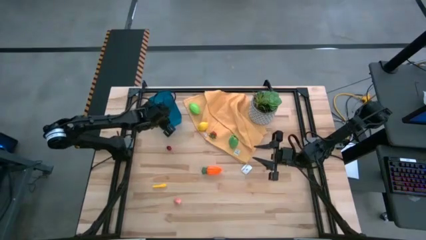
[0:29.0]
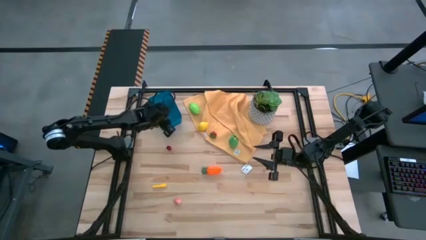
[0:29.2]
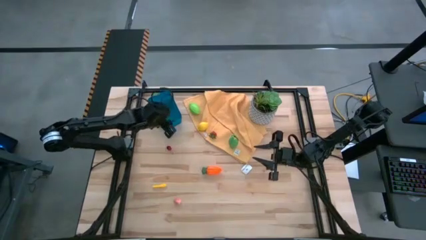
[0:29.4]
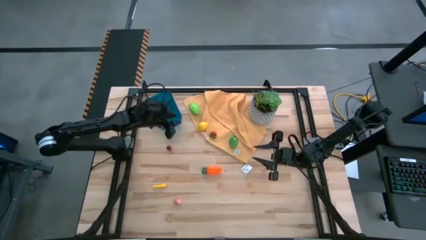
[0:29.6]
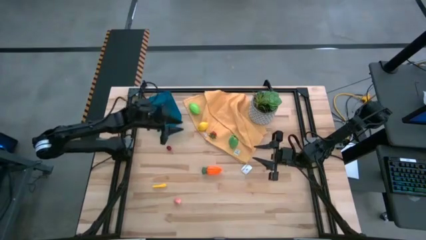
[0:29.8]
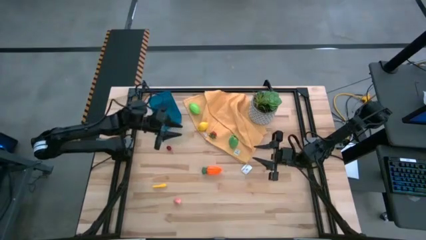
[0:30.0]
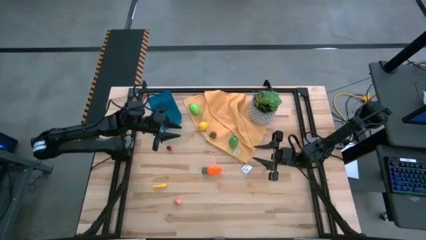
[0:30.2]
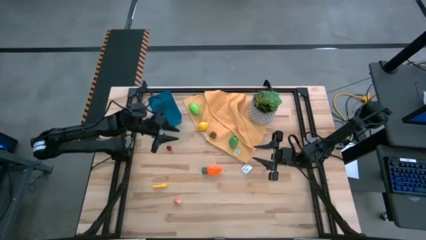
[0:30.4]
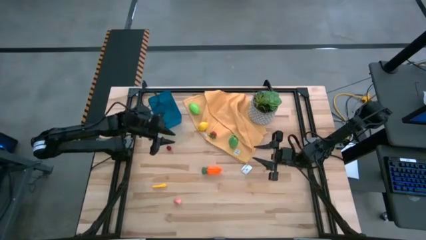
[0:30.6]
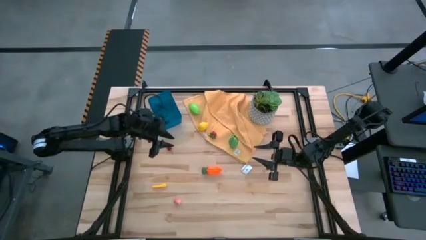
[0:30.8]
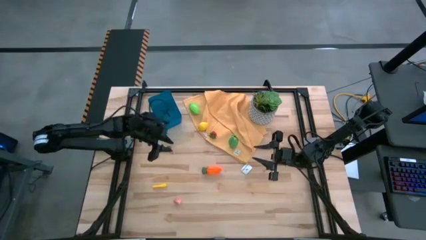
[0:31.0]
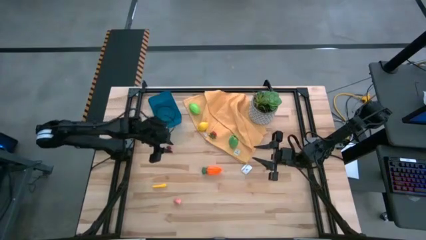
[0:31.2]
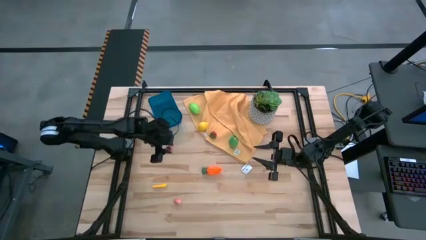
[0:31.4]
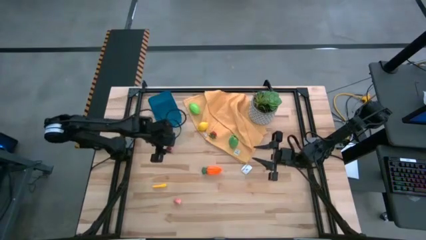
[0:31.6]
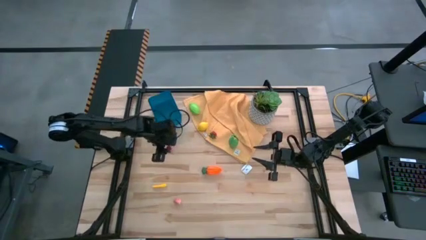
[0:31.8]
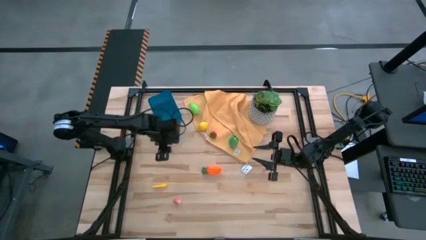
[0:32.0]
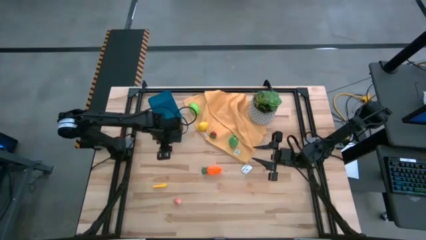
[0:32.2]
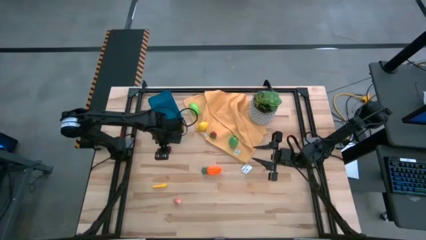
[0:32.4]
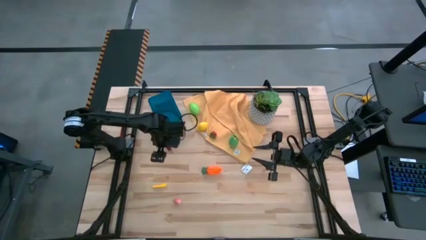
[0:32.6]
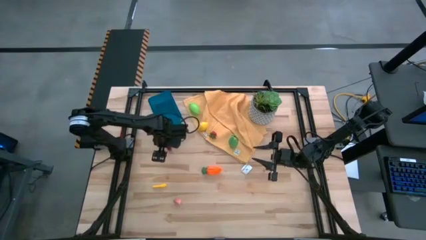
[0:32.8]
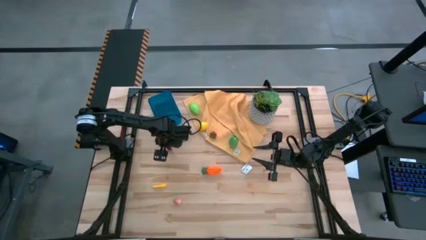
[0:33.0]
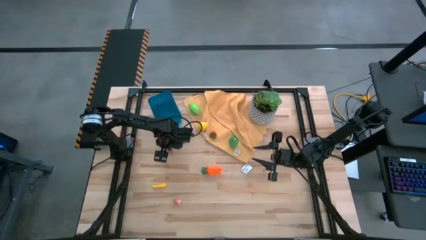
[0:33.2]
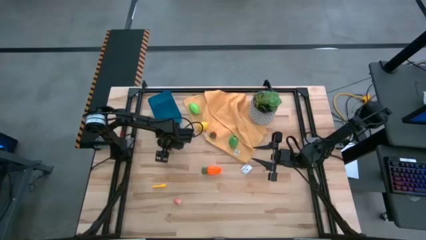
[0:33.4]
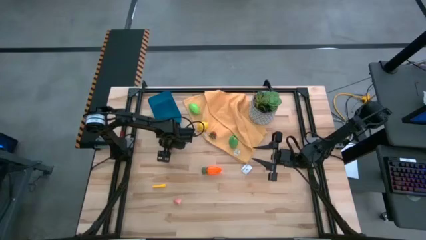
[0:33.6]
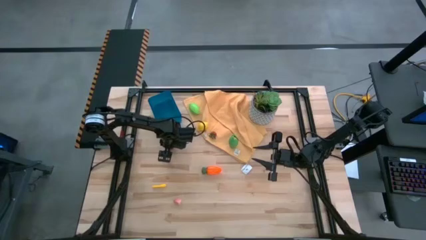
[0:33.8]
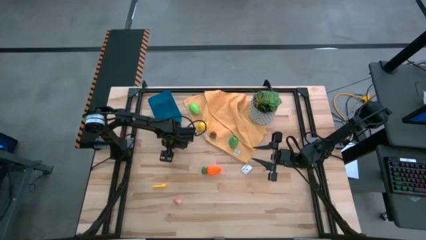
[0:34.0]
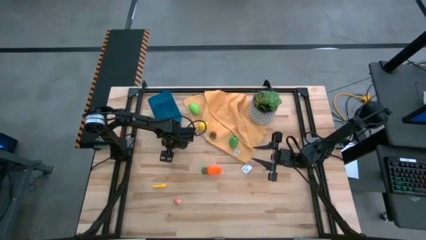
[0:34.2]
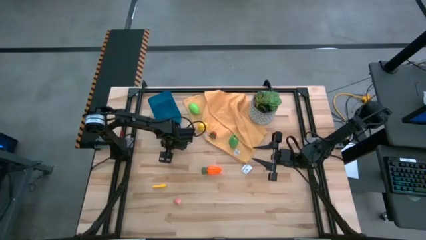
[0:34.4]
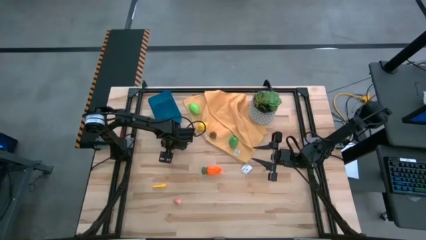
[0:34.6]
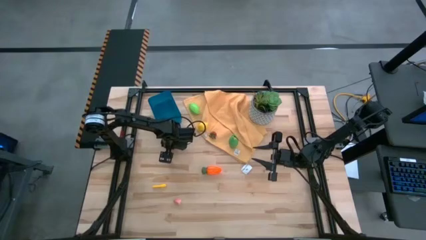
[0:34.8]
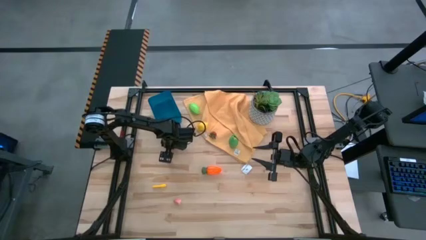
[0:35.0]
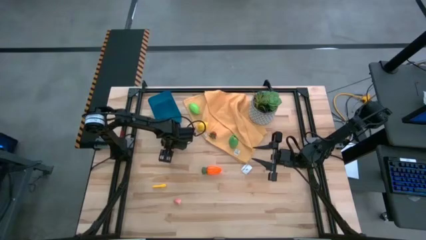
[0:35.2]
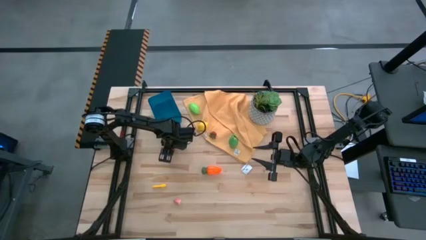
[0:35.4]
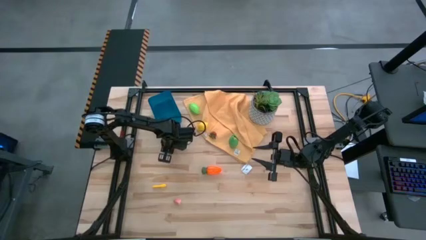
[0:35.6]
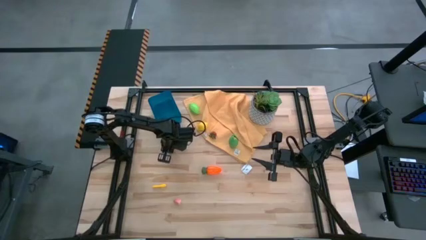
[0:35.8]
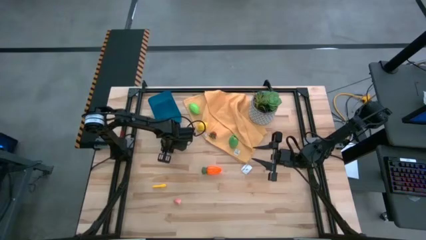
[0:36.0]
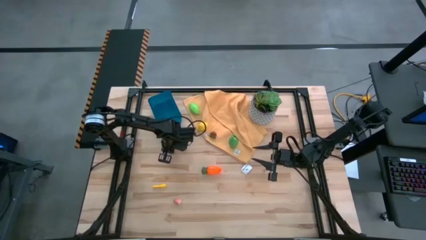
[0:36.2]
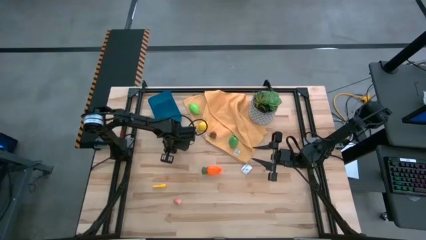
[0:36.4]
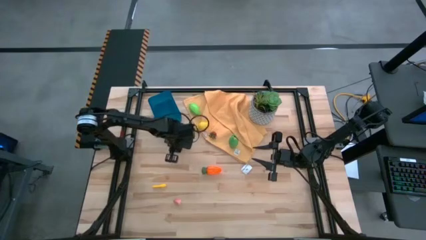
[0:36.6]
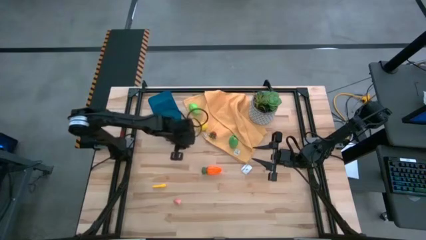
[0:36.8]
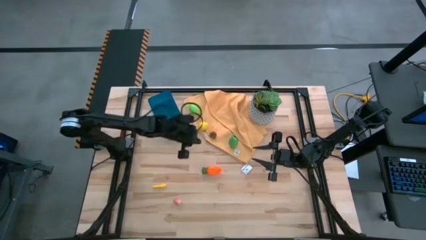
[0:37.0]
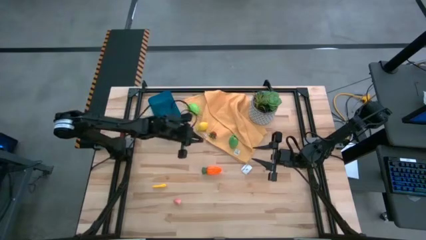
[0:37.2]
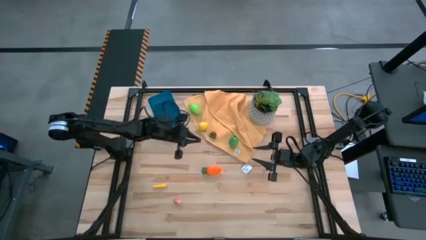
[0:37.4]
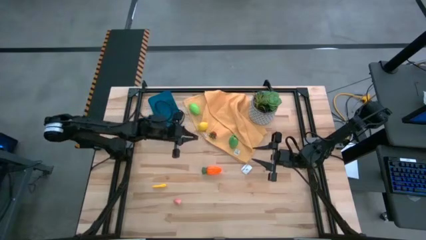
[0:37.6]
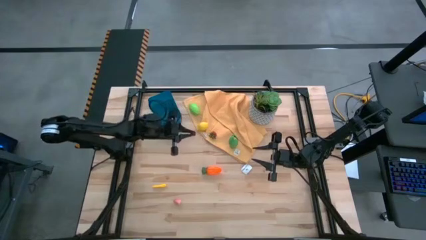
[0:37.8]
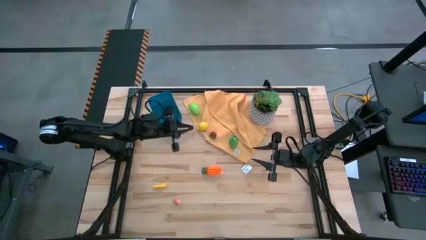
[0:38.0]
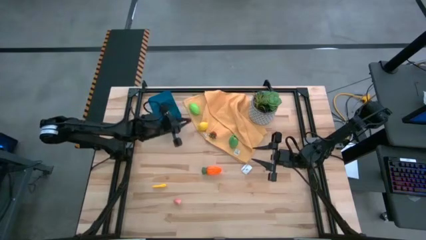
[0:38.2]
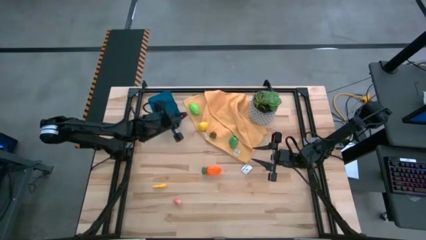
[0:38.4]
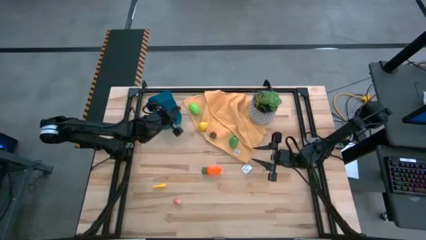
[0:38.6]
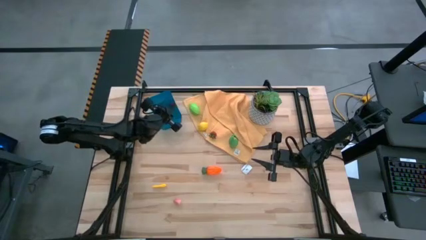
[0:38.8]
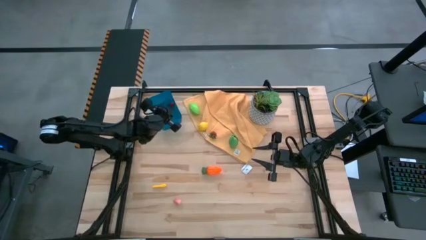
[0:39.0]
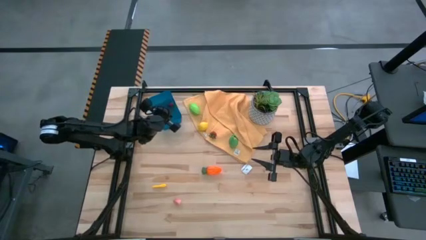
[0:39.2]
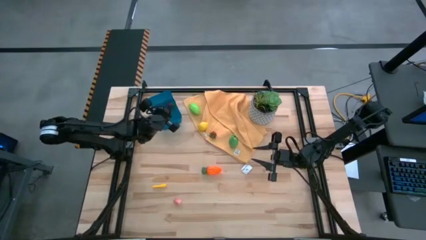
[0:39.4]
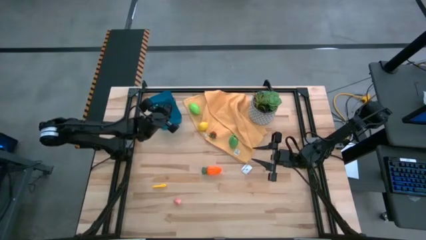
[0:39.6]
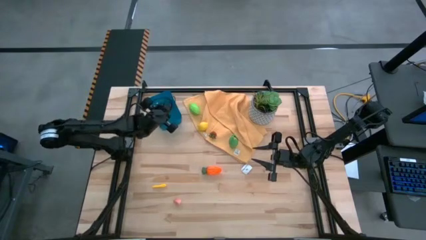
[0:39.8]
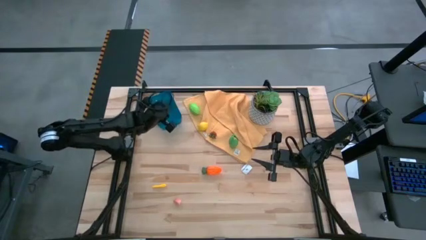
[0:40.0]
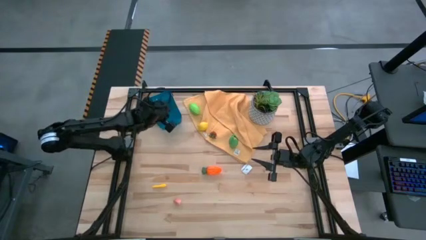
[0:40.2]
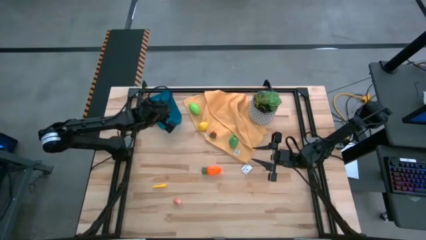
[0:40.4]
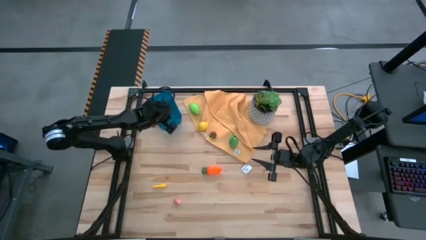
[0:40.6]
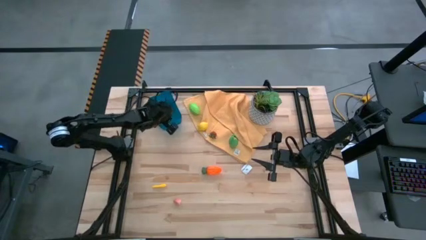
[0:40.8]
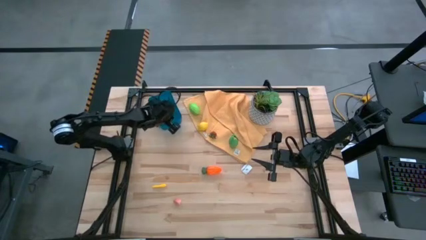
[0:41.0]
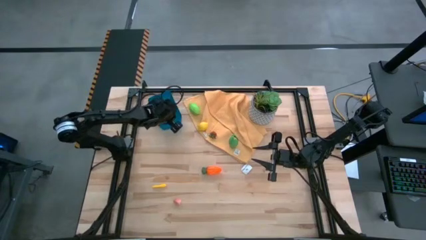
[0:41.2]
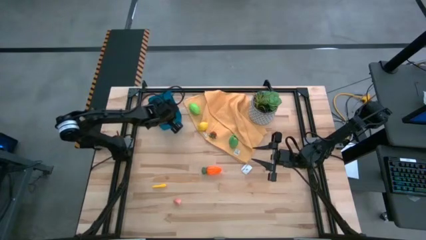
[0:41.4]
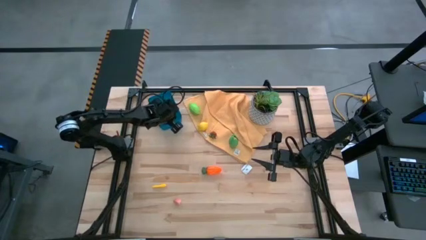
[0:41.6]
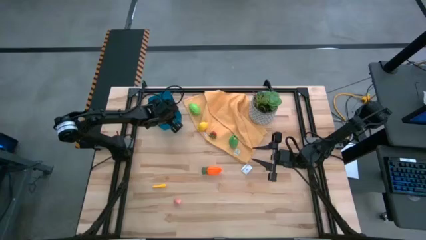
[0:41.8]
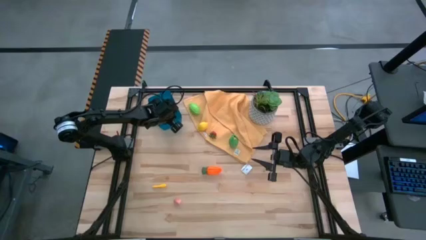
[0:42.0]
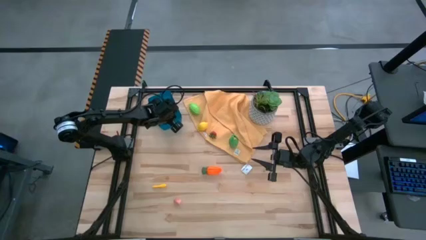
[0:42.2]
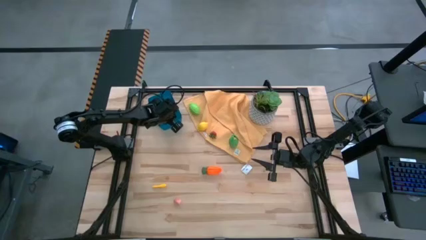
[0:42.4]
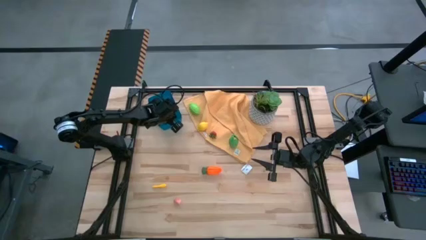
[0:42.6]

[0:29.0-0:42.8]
Task: Pick and placing Produce into tupperware
Put the red cherry into the blue bin

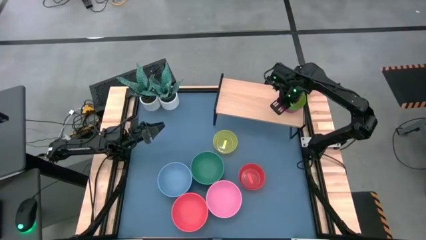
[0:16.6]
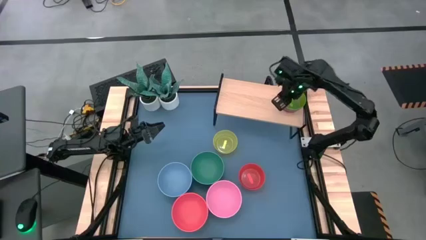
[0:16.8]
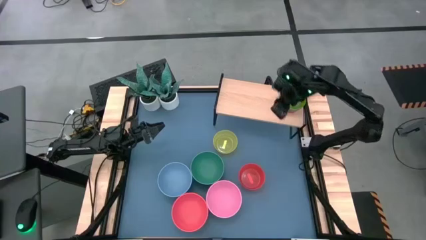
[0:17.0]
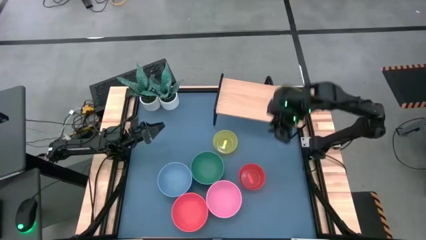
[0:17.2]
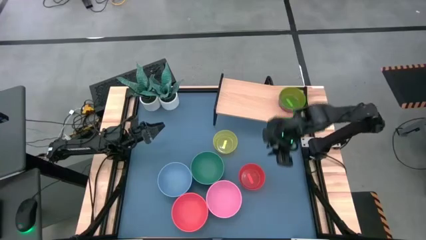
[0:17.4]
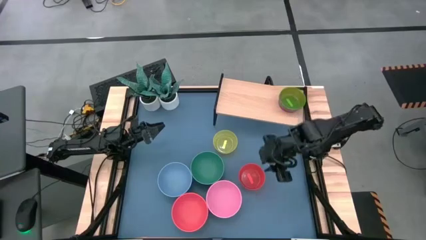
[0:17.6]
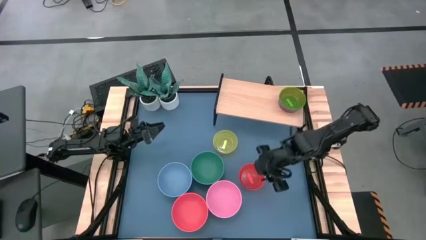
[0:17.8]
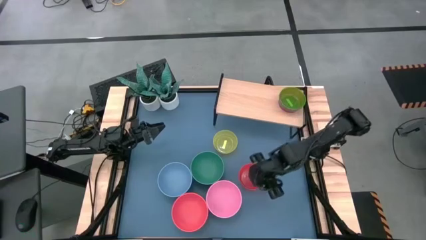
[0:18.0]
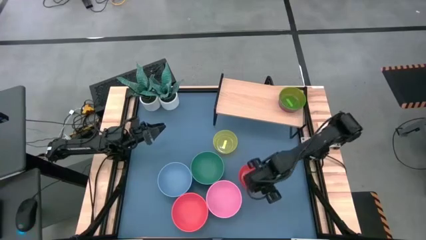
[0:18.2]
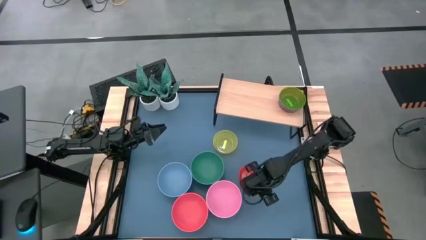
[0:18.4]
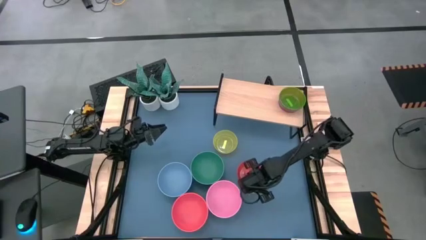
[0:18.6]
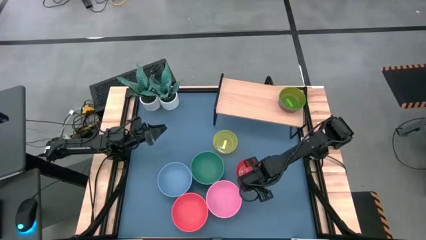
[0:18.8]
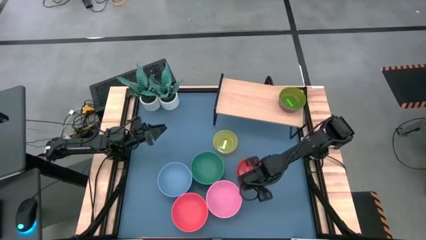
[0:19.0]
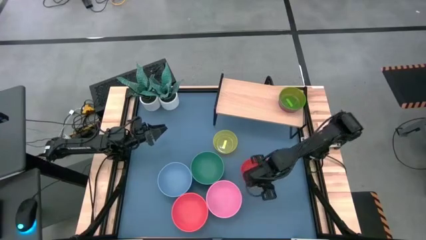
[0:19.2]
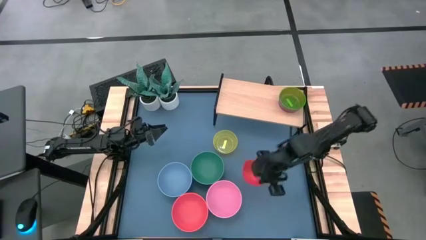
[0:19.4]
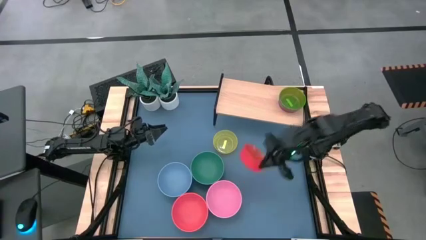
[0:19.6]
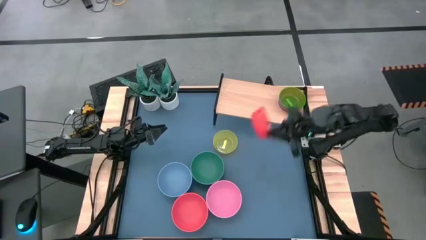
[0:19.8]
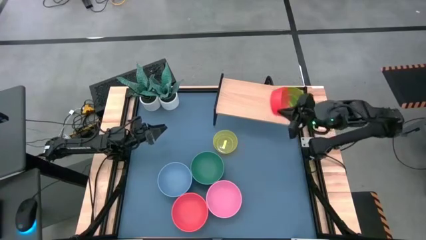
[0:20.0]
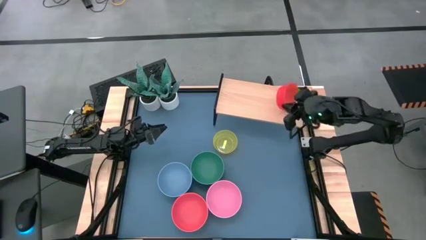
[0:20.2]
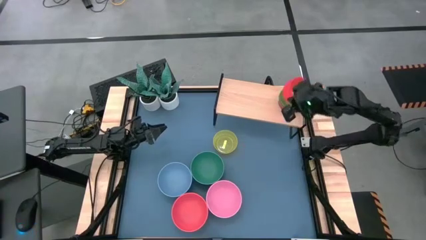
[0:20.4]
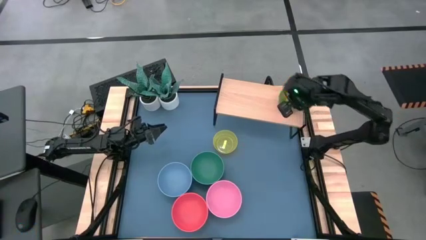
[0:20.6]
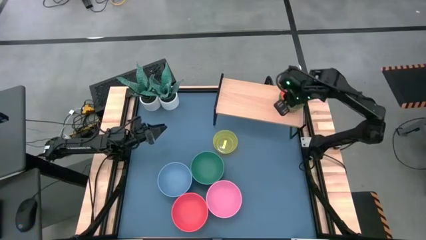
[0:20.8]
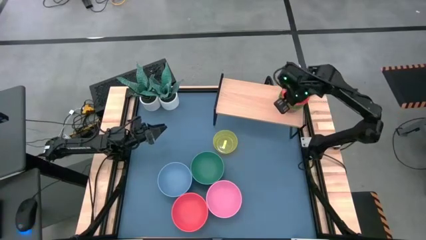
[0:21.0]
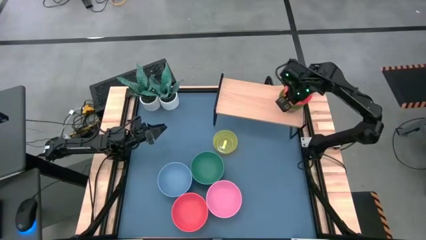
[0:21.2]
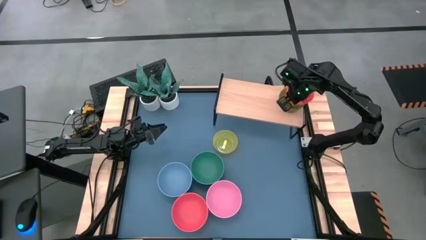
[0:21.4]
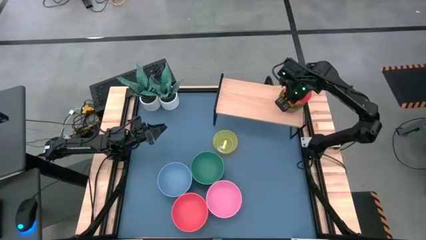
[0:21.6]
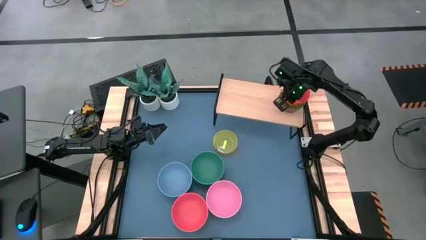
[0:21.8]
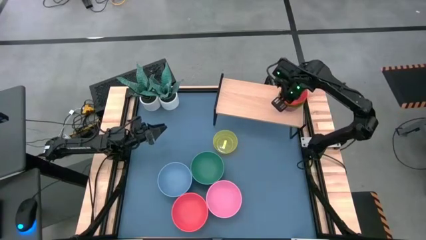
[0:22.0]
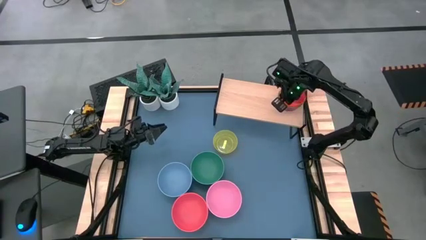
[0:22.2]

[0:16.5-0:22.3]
Task: Place and stack bowls onto a shelf
Stack the small orange bowl on top of the small light green bowl on the shelf
